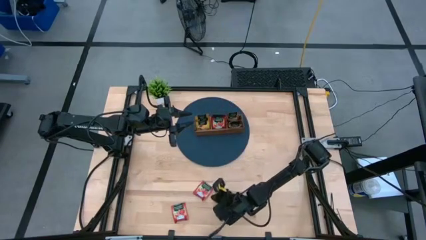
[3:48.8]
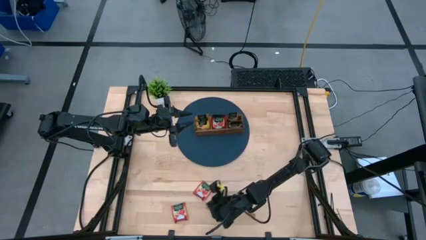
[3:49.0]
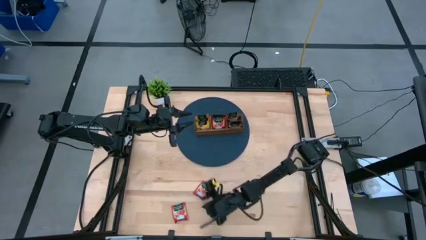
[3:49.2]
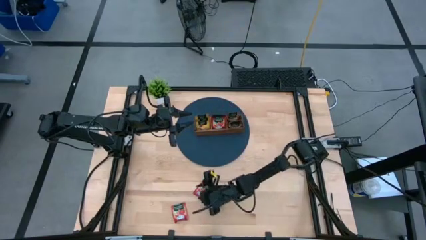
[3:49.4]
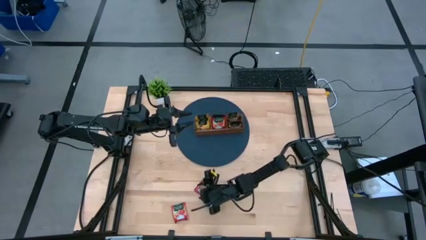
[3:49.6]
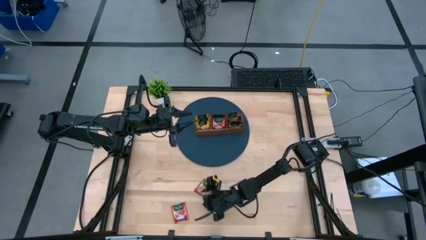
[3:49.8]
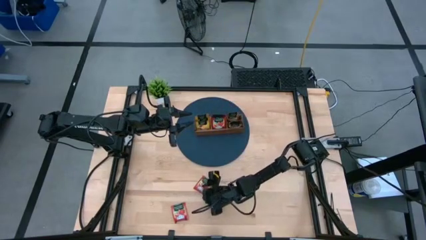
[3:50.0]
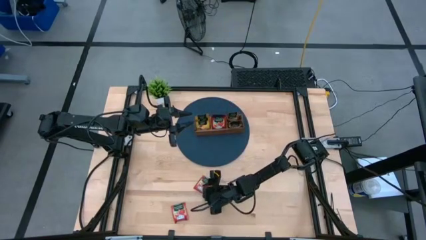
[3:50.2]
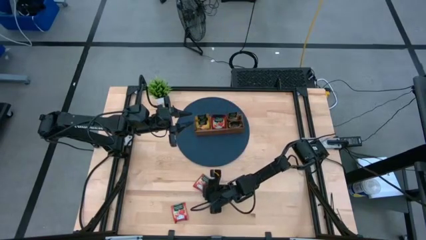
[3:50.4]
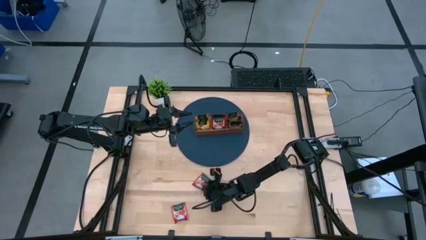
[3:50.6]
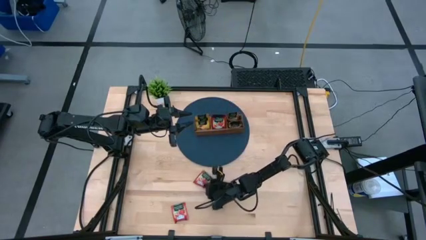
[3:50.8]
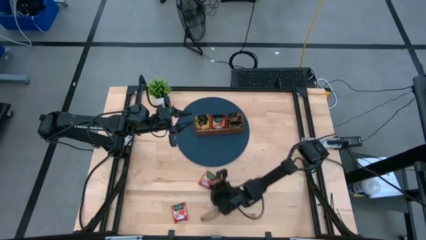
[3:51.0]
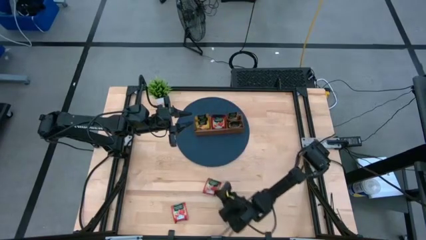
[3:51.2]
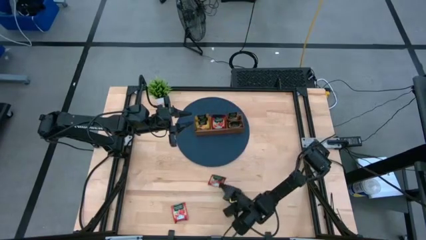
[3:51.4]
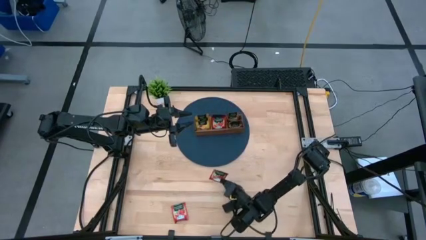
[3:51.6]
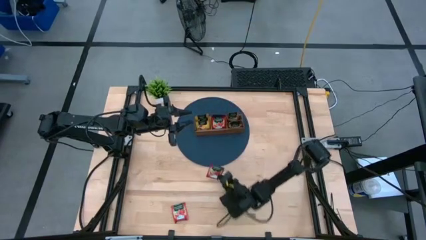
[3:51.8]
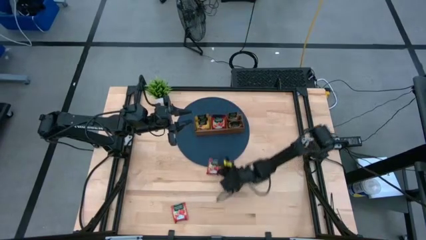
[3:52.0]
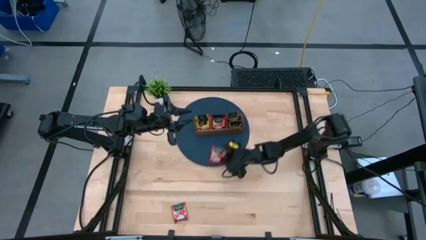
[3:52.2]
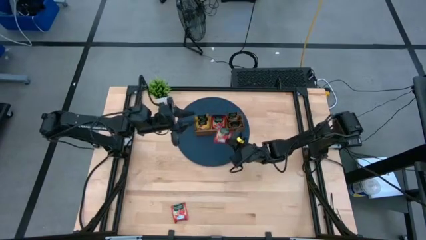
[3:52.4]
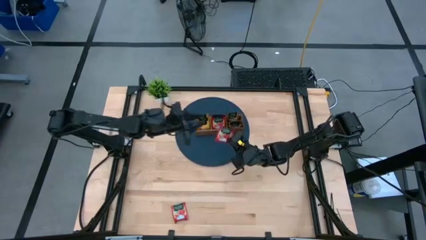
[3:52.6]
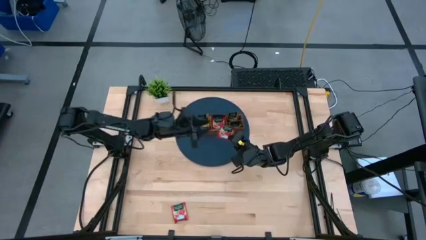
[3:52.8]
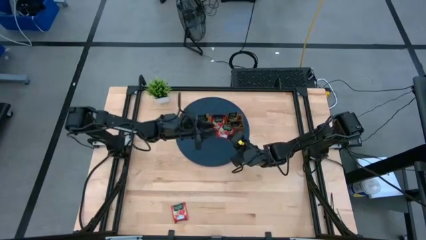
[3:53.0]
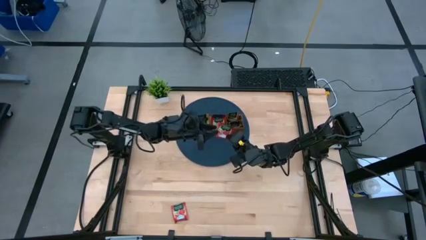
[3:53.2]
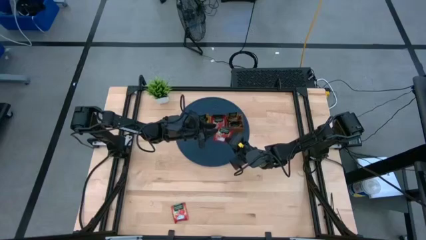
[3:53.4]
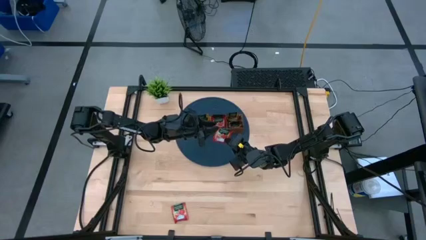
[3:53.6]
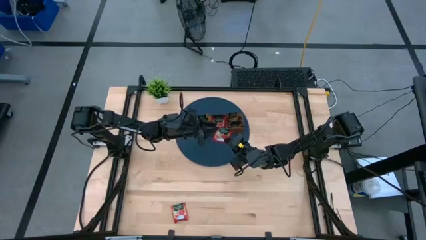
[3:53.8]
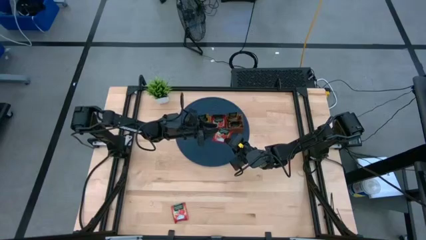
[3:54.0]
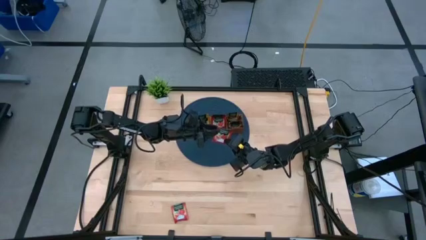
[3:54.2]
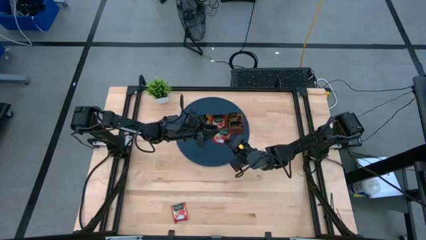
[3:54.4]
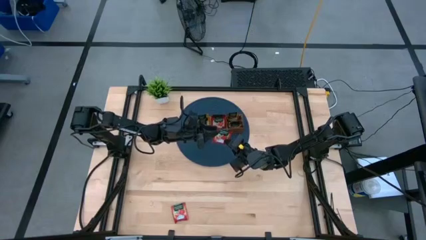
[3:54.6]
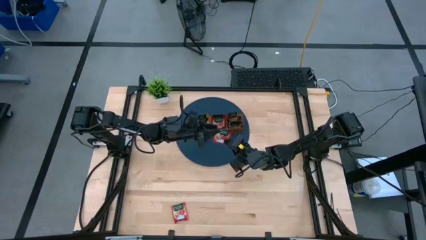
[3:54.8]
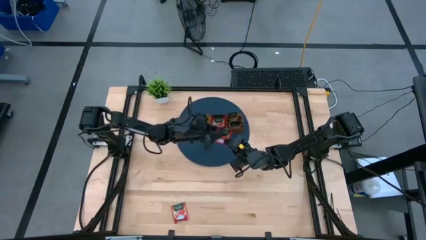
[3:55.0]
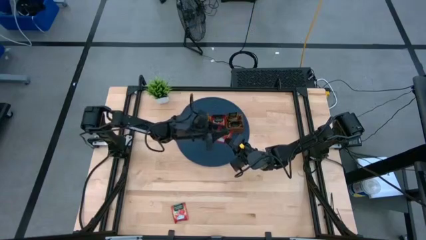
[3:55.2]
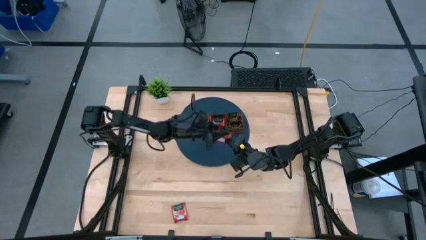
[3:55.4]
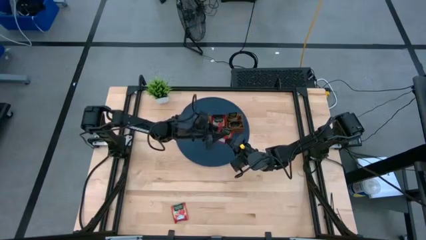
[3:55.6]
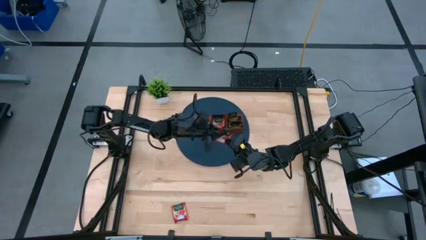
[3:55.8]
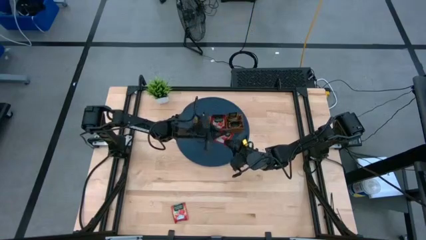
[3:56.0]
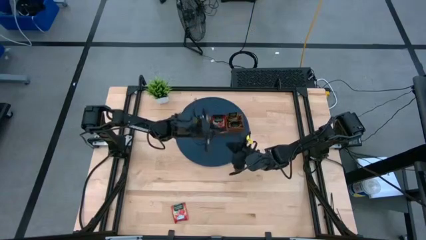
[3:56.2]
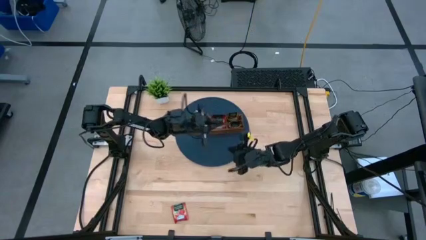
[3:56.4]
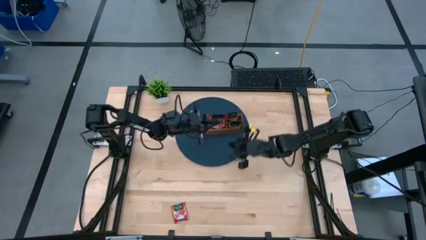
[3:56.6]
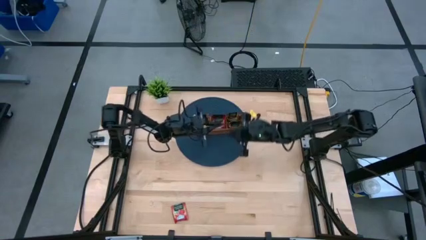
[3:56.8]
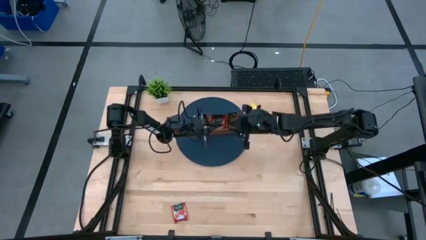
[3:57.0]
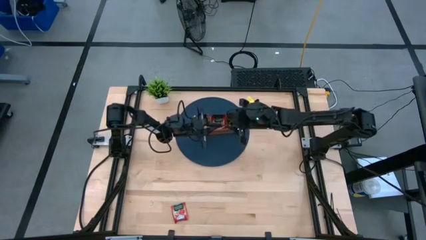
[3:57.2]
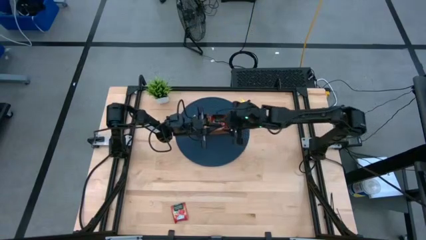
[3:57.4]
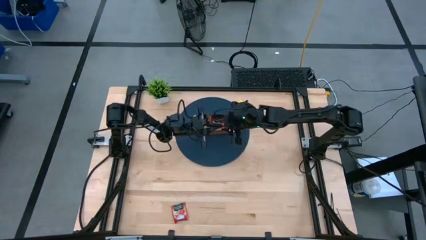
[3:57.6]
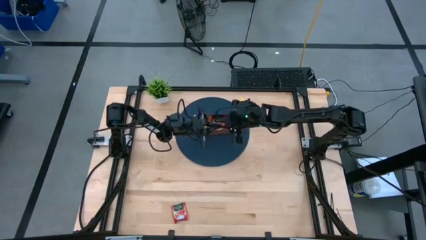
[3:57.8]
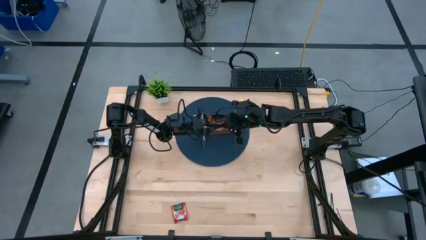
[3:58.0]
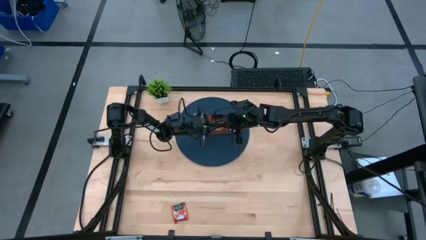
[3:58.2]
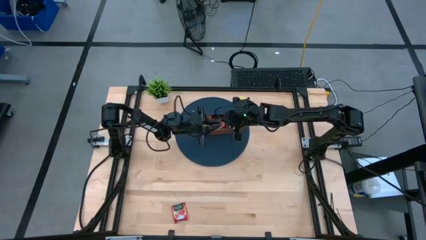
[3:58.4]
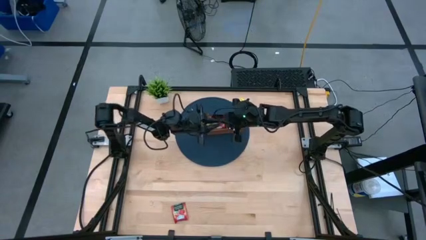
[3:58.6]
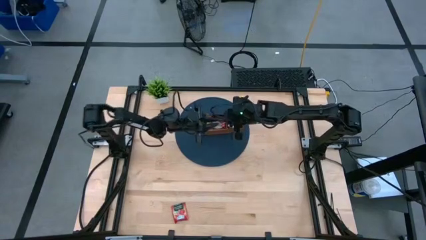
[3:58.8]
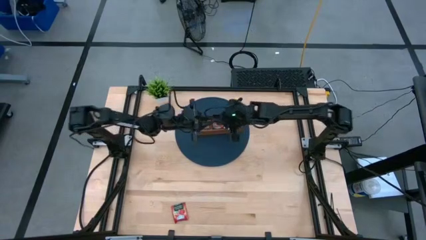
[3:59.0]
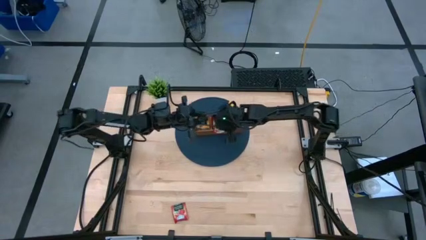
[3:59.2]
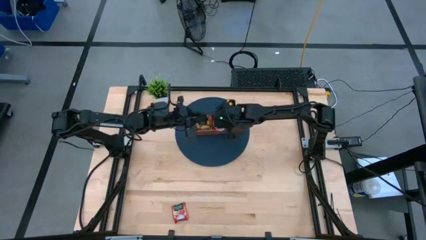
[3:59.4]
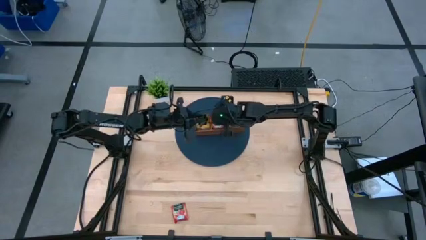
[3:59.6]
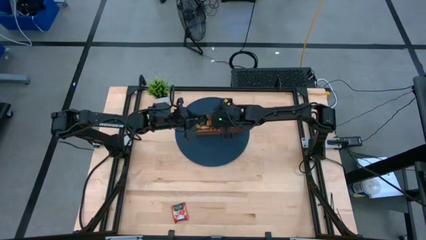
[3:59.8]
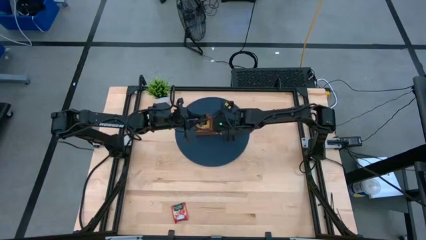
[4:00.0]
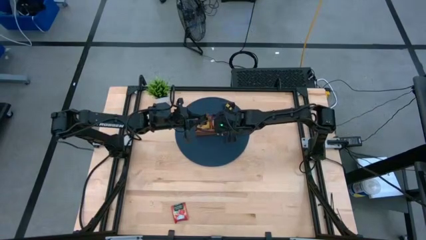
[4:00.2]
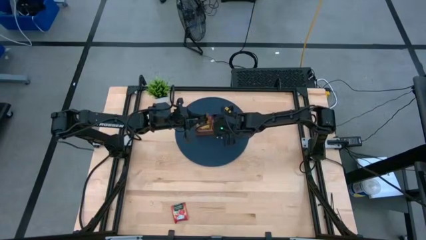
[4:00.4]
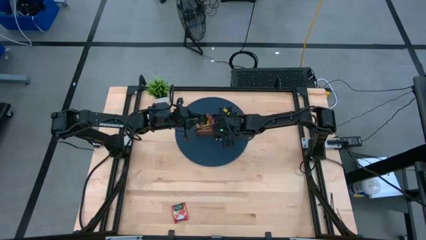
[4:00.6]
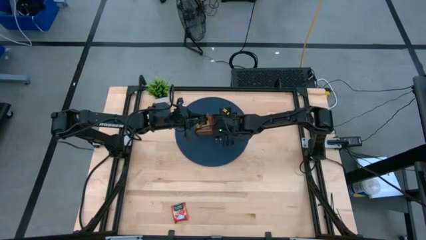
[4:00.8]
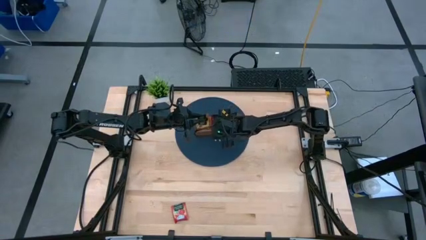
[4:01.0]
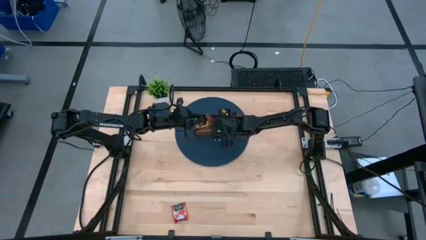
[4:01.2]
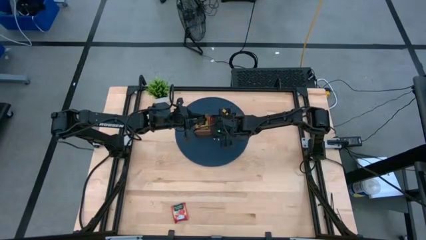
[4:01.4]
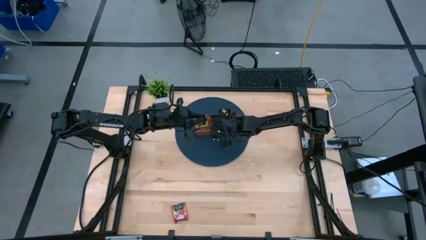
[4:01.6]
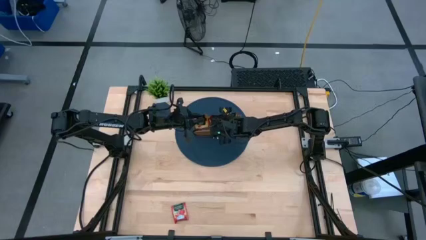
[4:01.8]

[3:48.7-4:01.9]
Task: Pick & Place Tea
Put the red tea bag into the middle section of the wooden organizer
